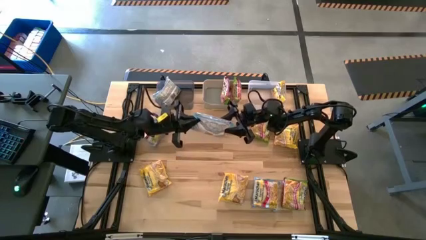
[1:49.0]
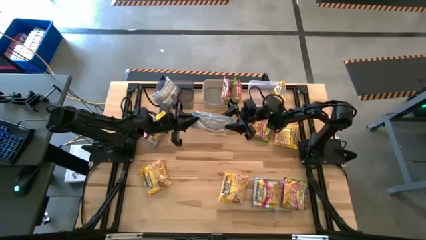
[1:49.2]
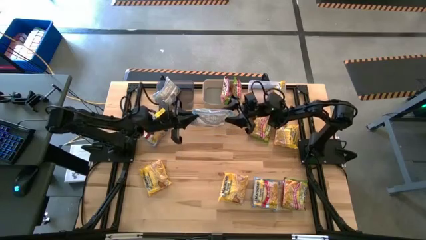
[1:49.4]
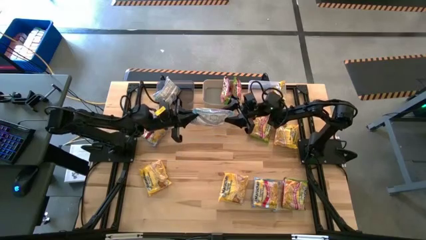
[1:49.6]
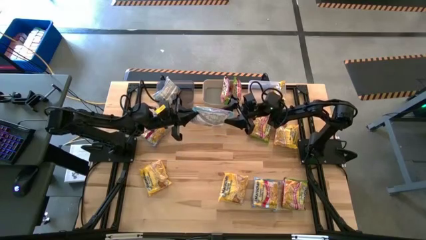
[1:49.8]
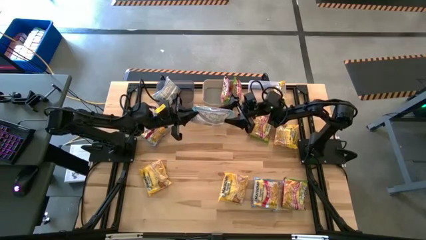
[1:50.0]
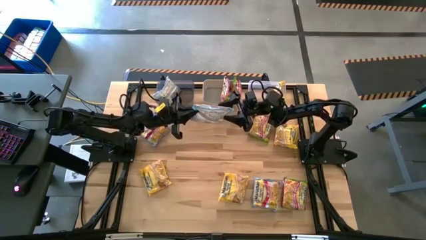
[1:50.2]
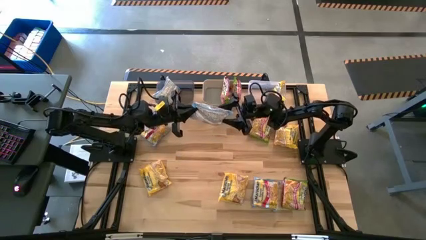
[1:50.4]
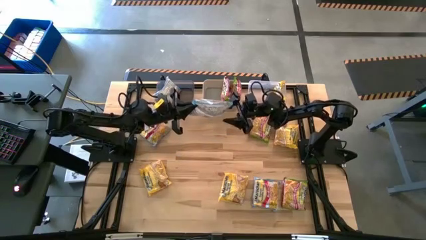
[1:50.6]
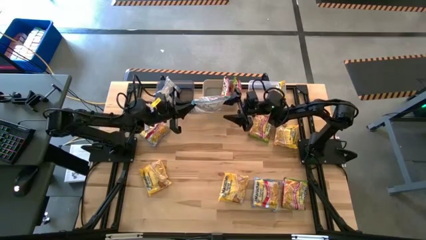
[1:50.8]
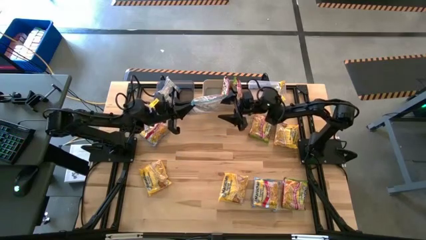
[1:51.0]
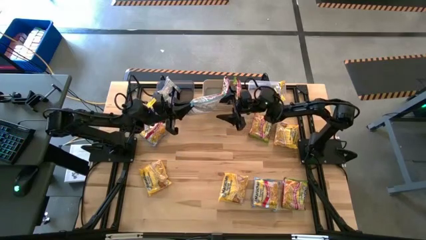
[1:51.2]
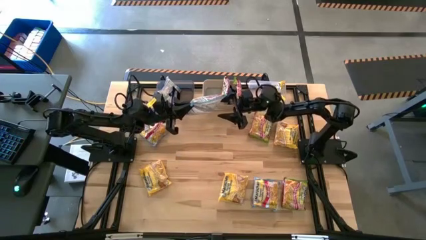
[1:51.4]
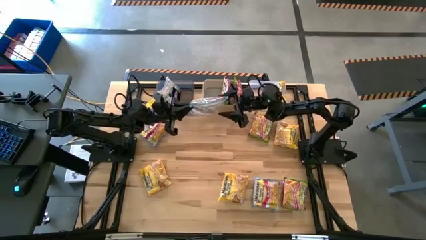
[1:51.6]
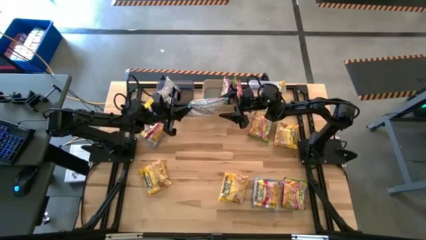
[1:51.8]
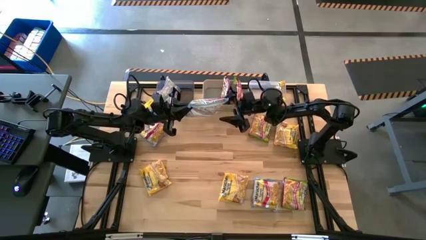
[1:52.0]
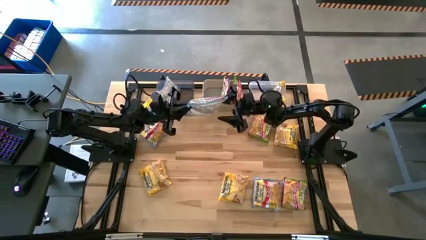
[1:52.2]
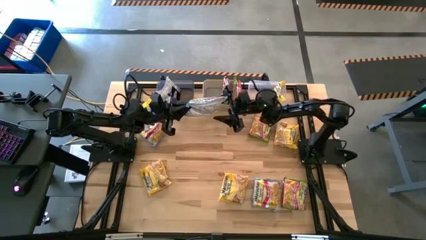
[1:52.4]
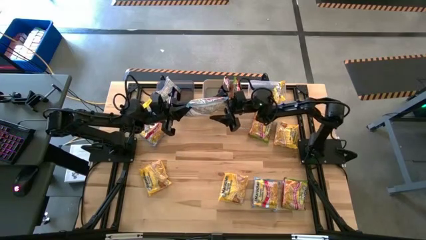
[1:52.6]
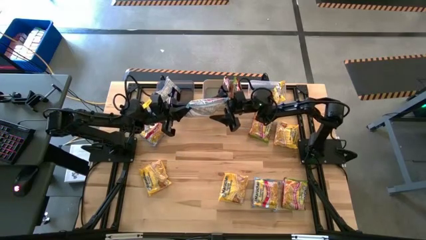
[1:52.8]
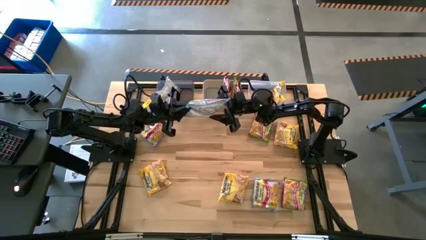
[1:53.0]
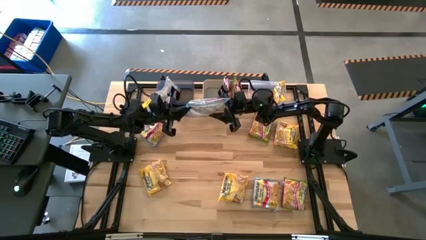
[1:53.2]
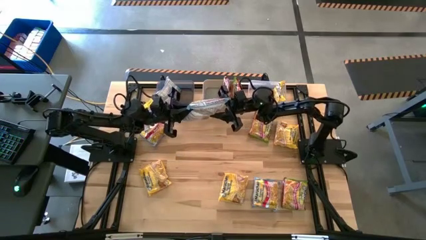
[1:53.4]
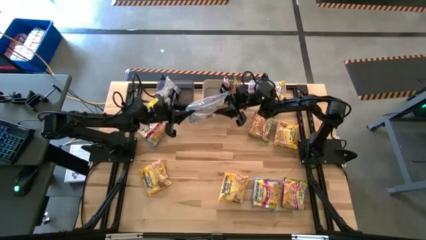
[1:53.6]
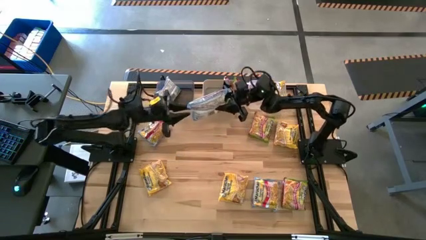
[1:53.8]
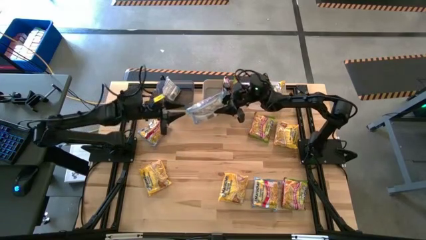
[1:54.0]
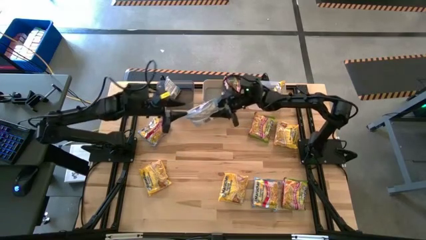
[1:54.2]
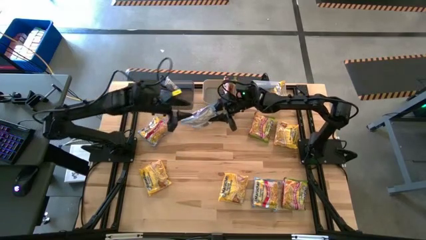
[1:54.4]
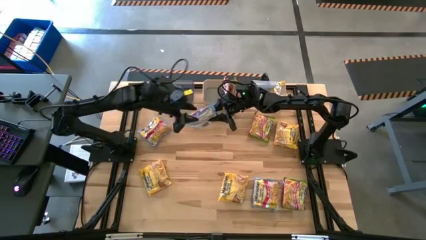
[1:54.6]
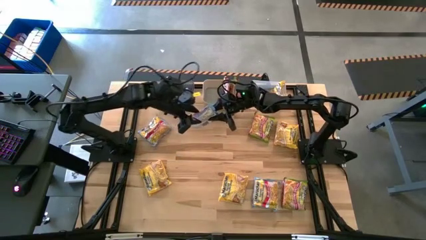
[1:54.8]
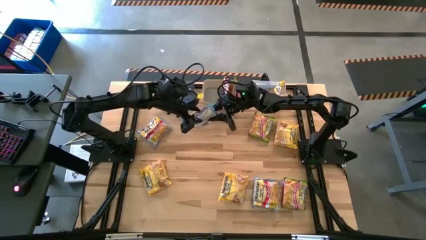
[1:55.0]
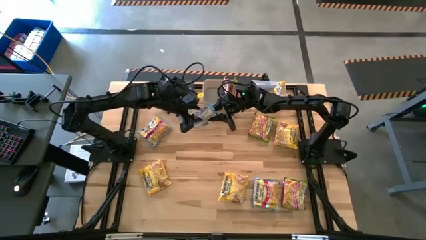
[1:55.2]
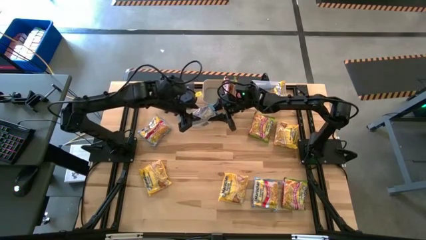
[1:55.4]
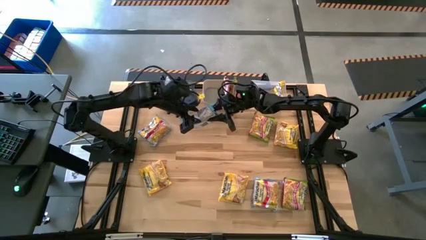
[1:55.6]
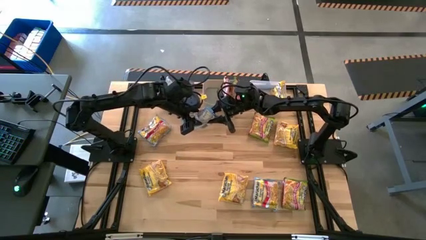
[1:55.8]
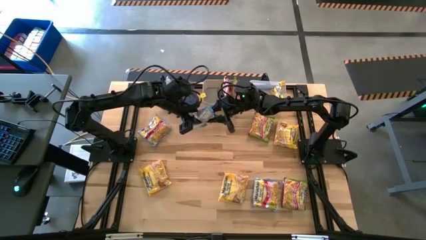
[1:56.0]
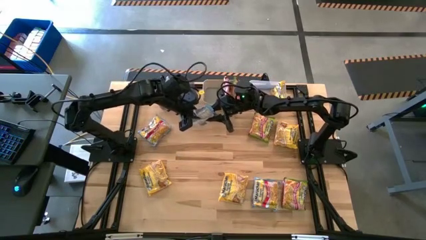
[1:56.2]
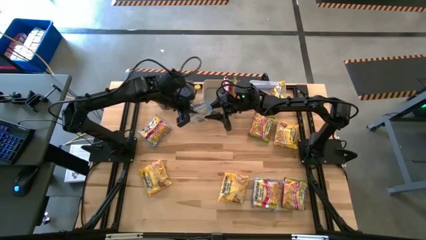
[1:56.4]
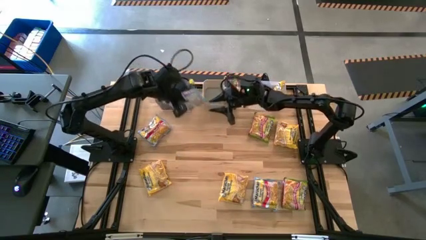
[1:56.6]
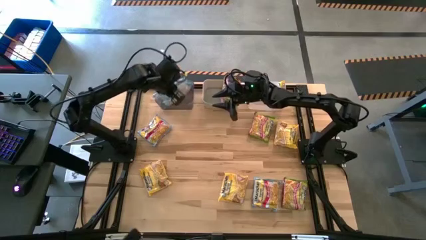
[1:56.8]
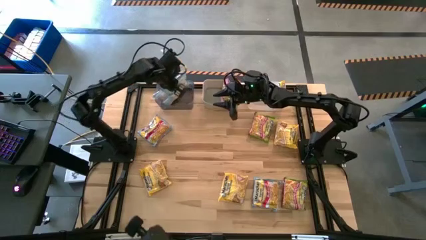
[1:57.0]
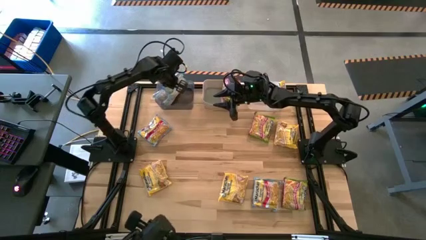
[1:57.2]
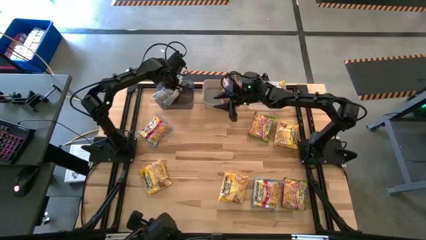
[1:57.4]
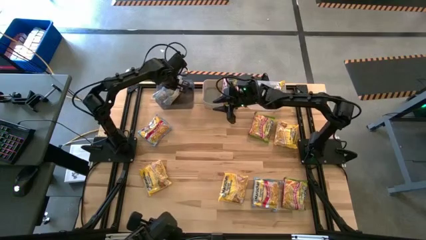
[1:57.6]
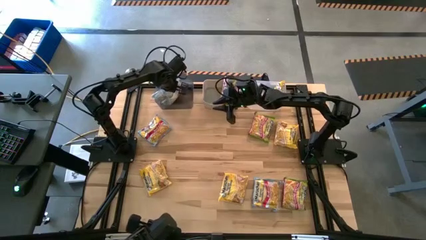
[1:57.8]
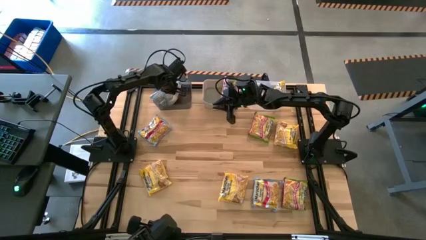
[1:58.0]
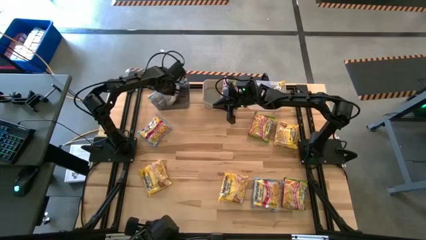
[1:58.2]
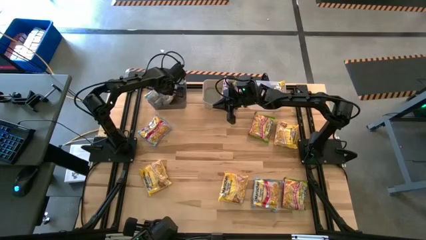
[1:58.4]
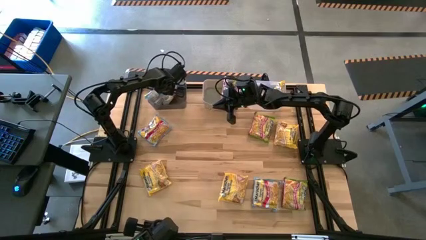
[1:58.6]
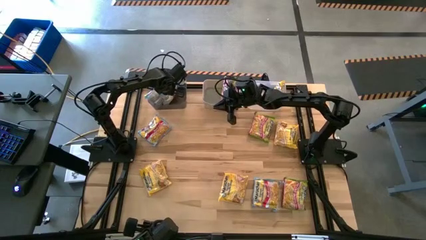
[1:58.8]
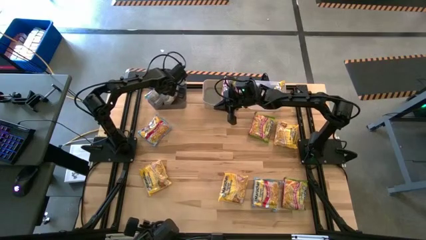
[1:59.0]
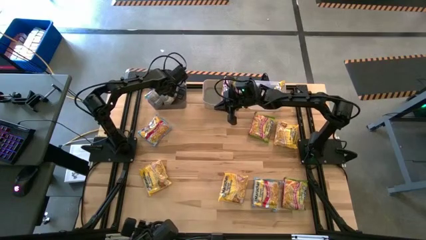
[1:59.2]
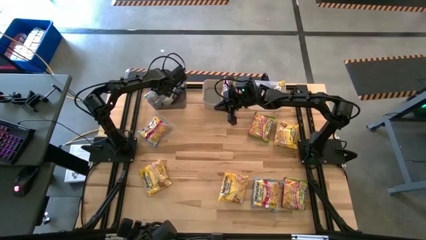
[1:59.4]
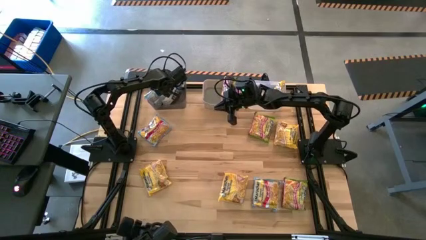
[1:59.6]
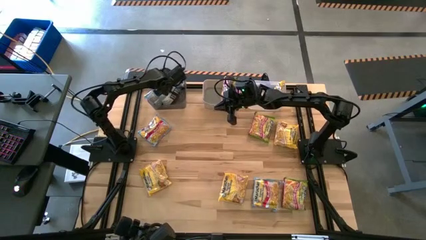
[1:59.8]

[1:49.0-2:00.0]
Task: Sort Maruchan noodles
Put the top right blue noodle pack into the black bin

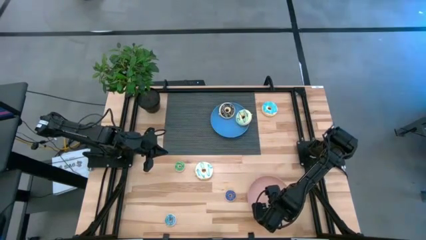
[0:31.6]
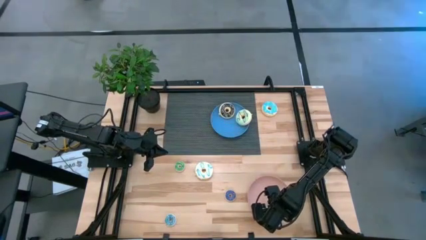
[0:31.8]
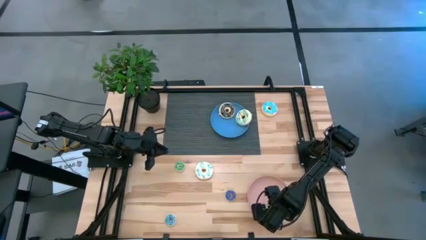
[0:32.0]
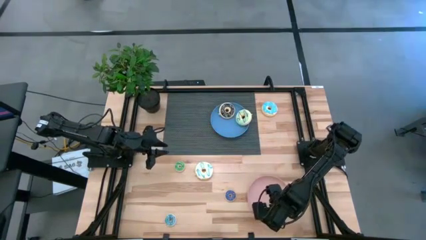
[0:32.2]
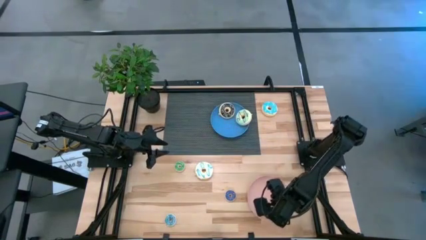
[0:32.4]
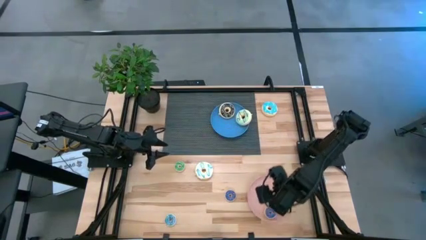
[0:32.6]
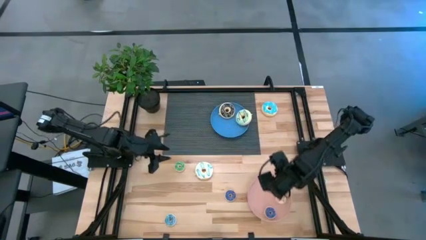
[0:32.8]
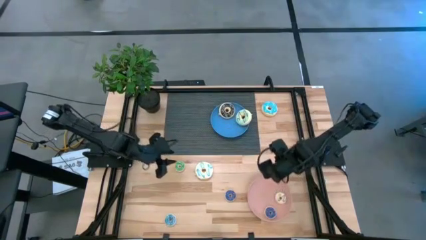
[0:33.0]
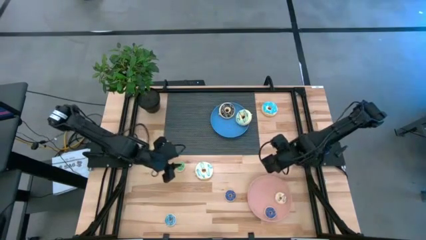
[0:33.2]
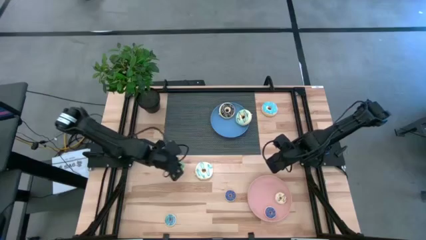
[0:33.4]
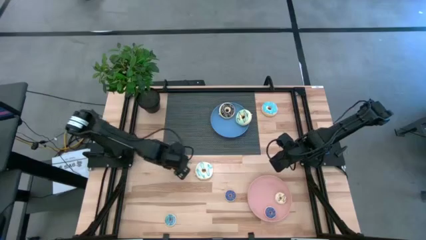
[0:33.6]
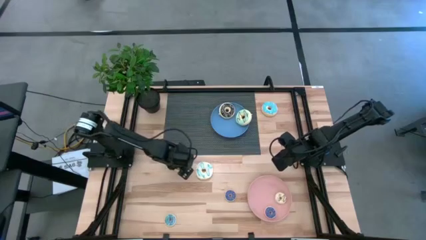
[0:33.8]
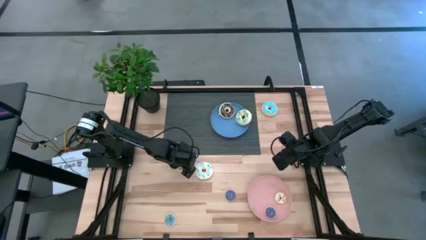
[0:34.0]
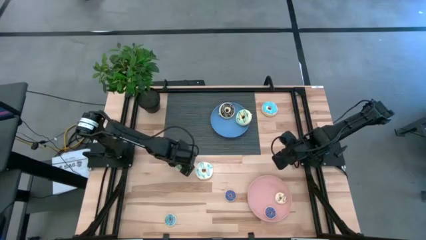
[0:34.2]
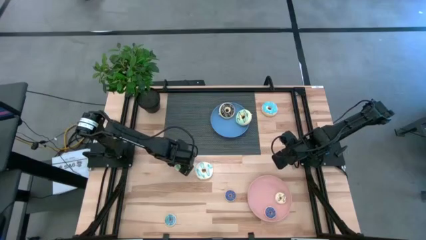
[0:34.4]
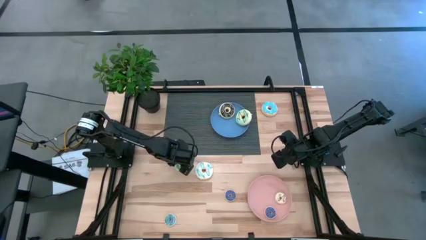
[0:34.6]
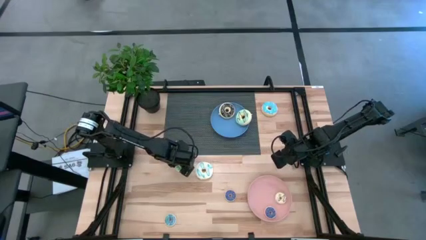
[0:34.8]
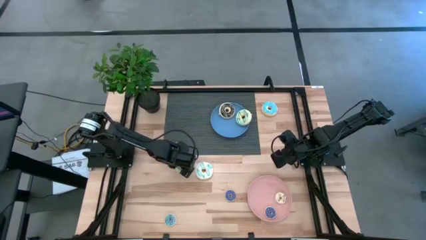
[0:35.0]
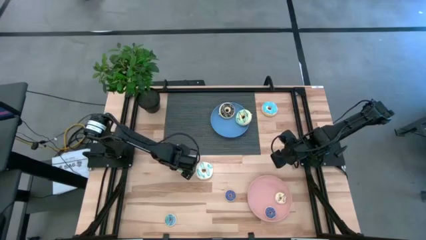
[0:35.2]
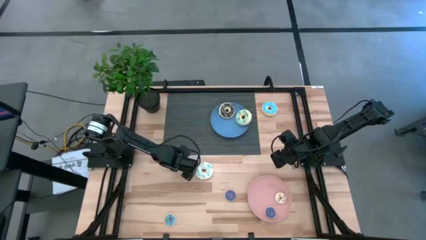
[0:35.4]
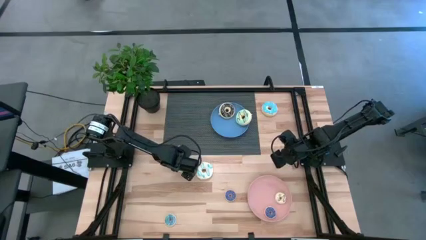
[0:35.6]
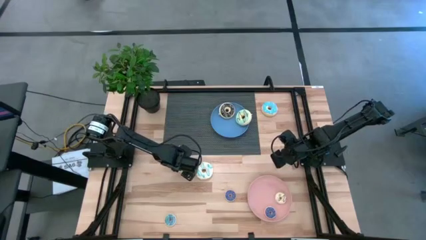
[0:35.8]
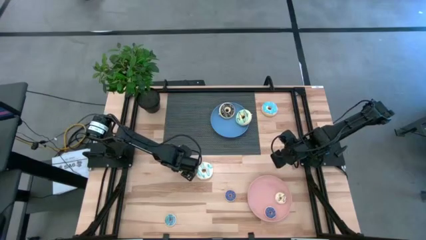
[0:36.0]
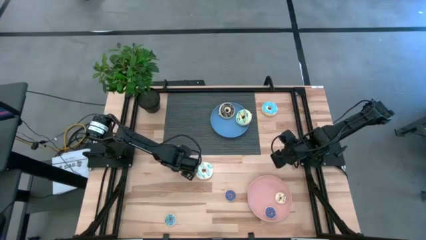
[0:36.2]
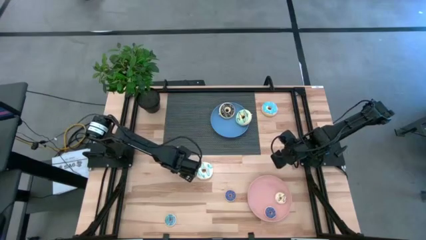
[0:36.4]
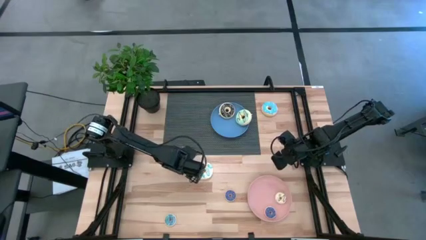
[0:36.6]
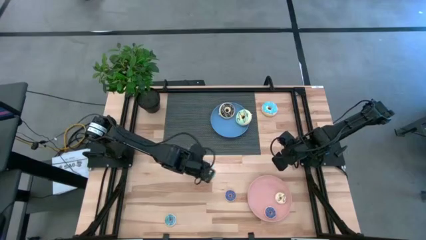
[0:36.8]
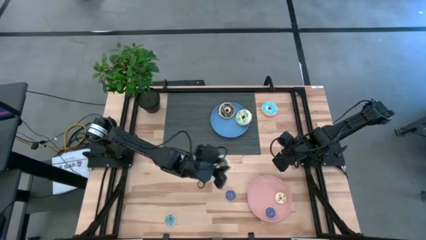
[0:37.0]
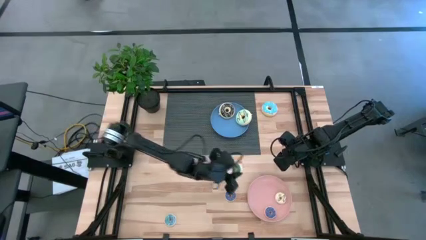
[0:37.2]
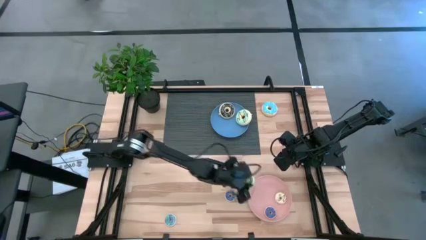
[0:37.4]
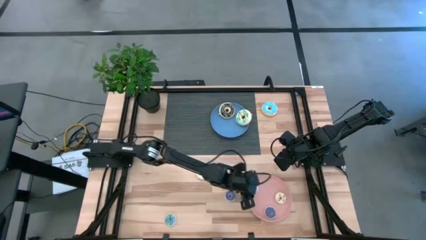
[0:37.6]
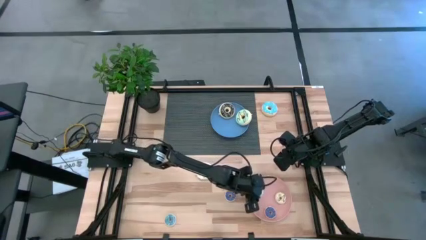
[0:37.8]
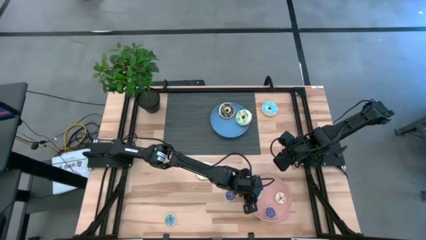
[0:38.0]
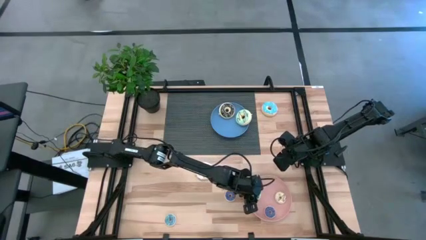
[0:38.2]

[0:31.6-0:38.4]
Task: Pick & Place donuts
Put the small green donut on the pink plate
